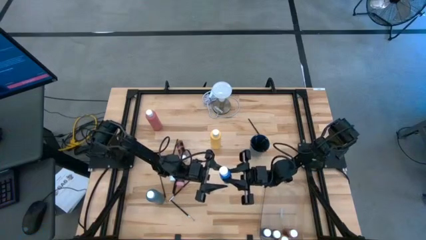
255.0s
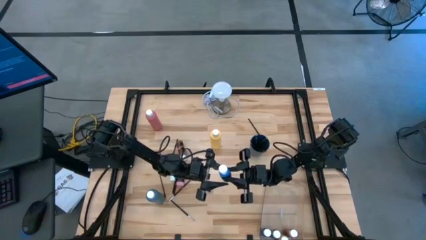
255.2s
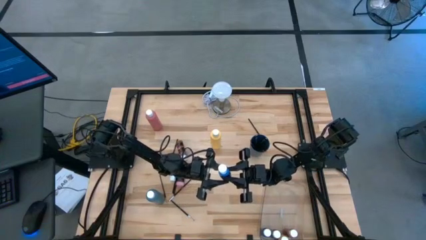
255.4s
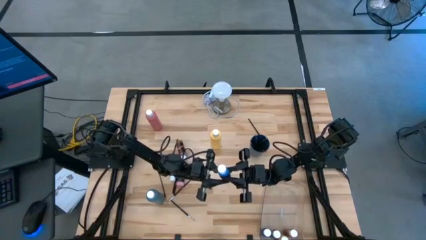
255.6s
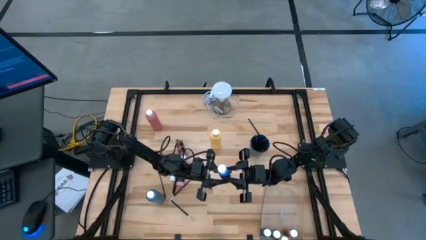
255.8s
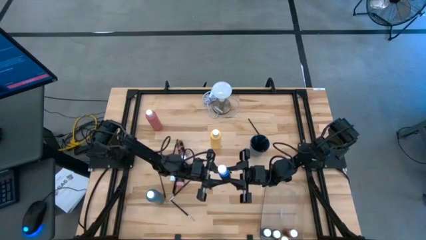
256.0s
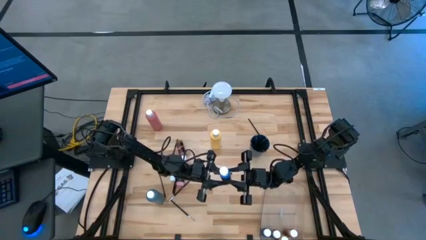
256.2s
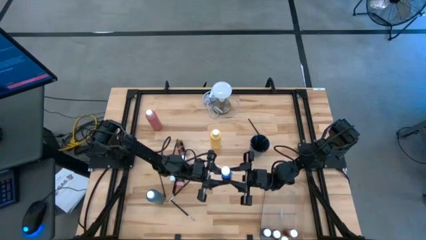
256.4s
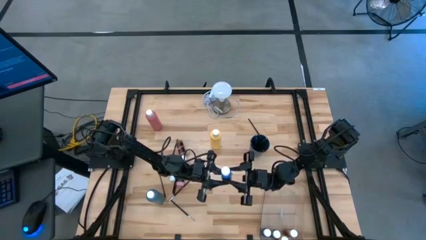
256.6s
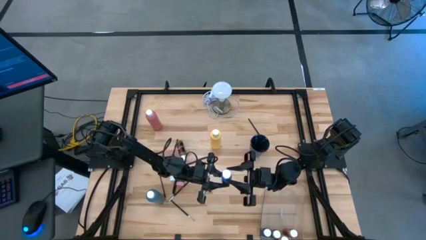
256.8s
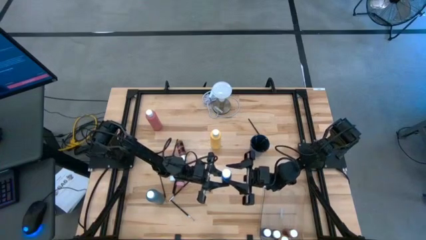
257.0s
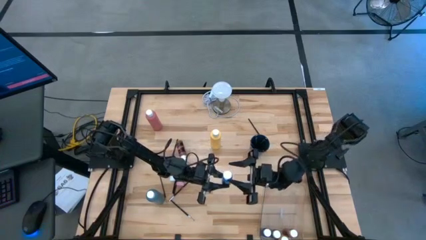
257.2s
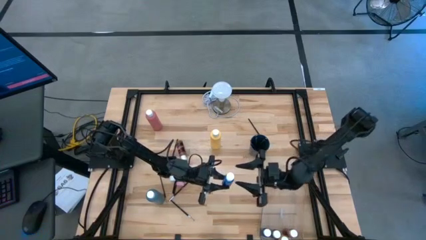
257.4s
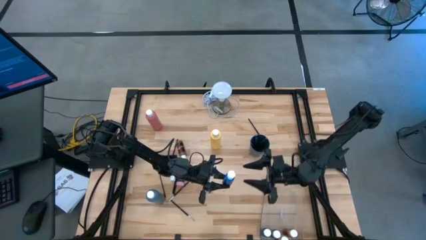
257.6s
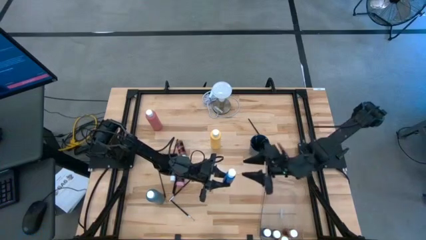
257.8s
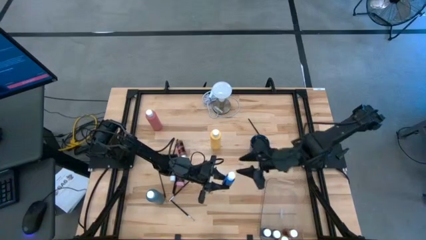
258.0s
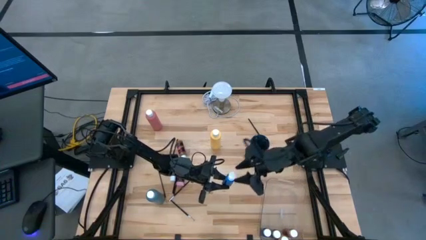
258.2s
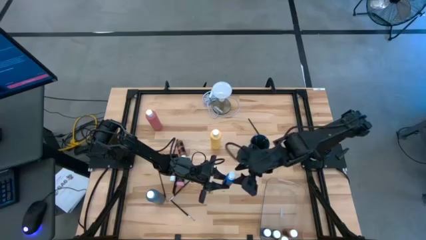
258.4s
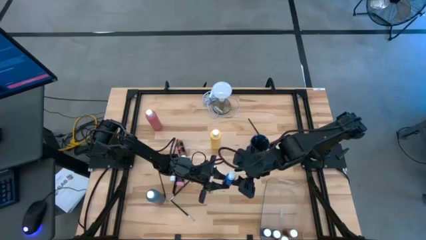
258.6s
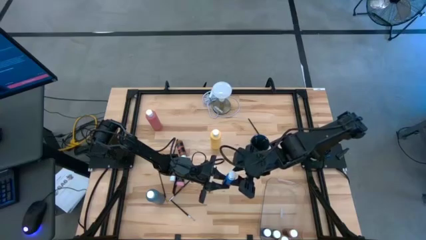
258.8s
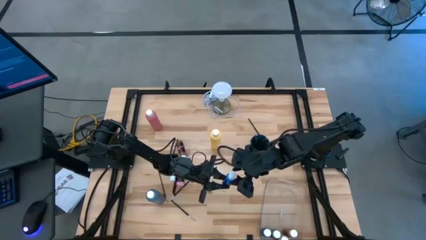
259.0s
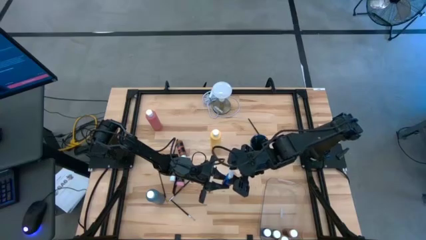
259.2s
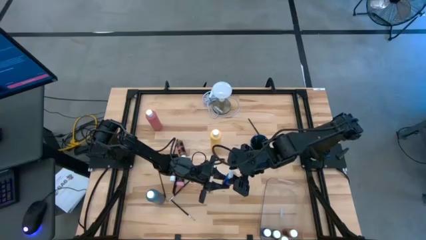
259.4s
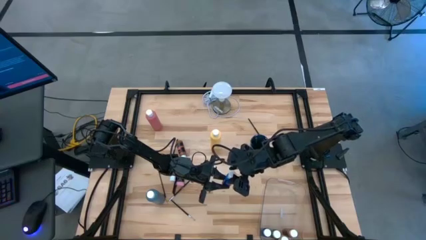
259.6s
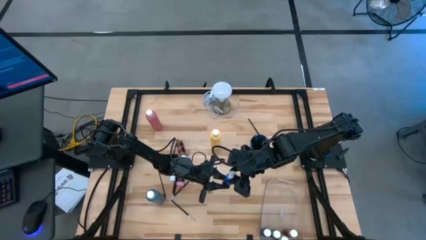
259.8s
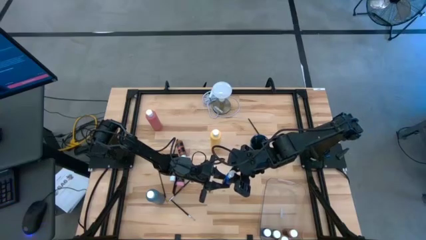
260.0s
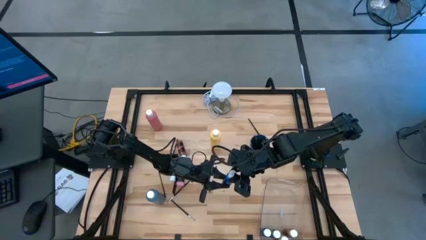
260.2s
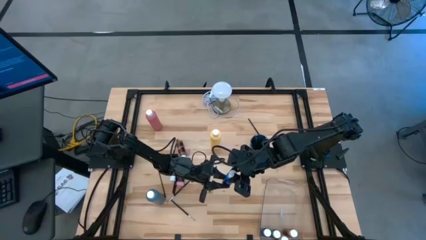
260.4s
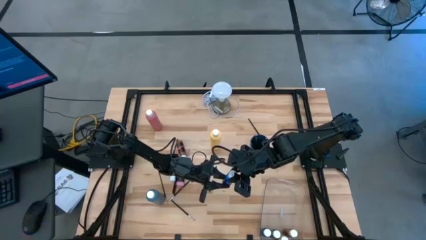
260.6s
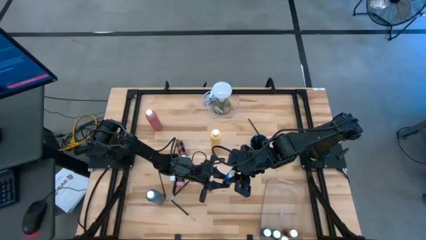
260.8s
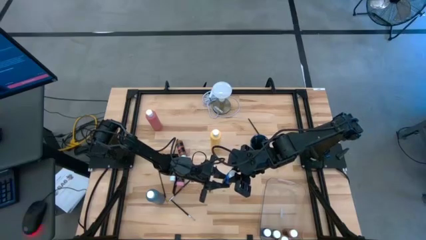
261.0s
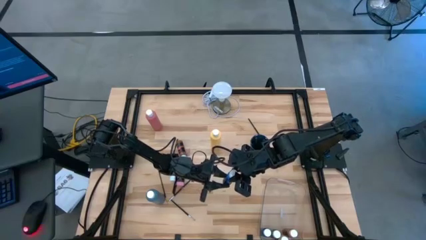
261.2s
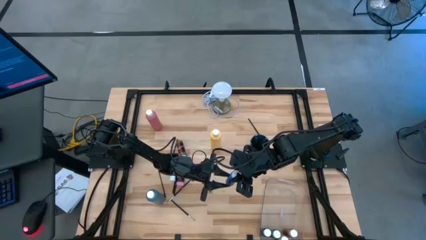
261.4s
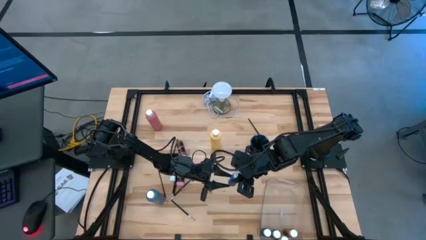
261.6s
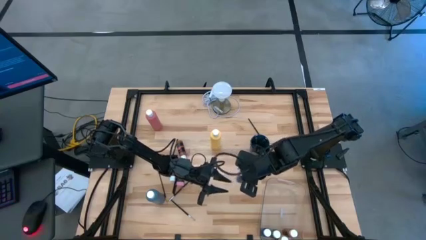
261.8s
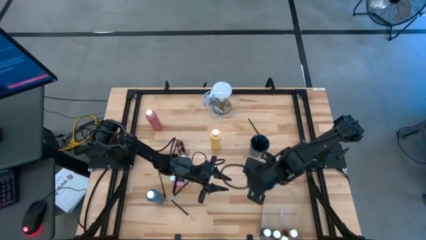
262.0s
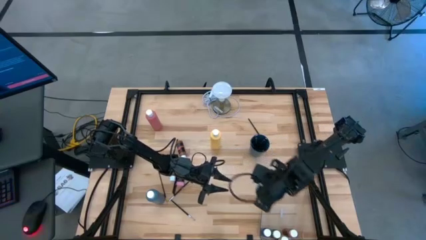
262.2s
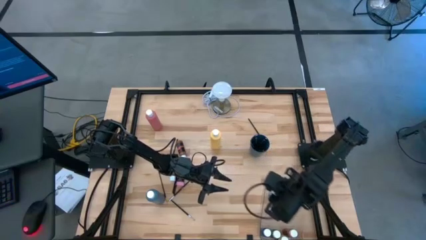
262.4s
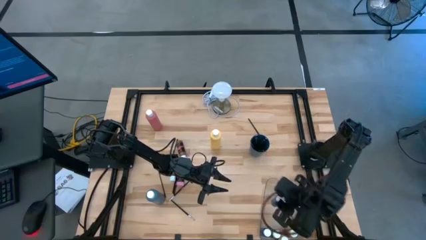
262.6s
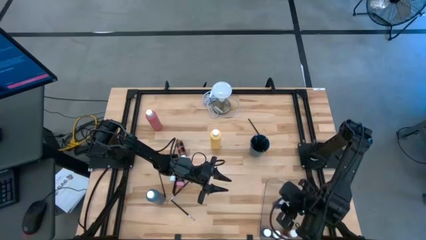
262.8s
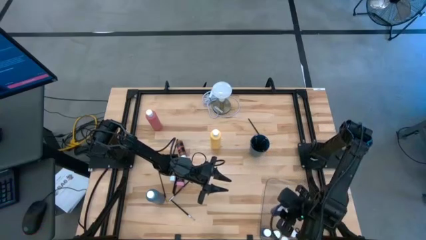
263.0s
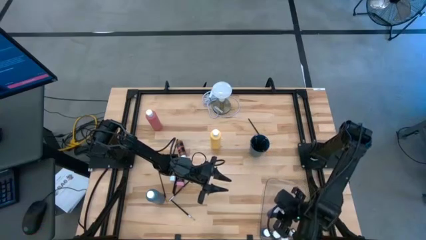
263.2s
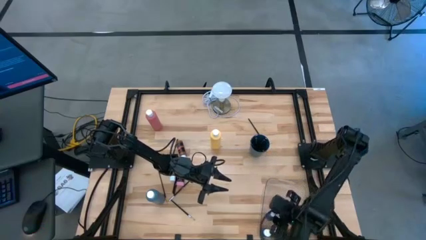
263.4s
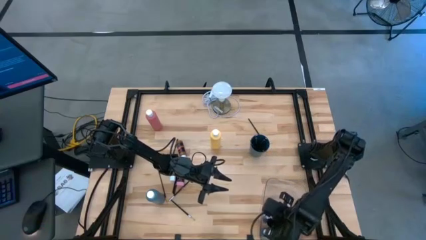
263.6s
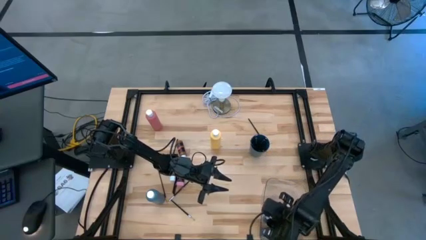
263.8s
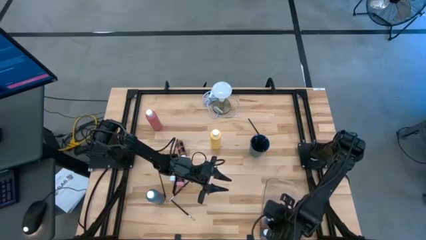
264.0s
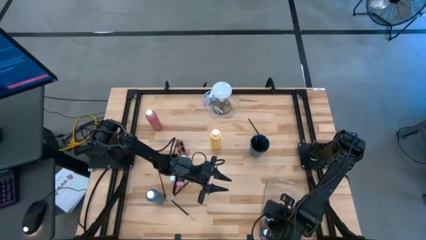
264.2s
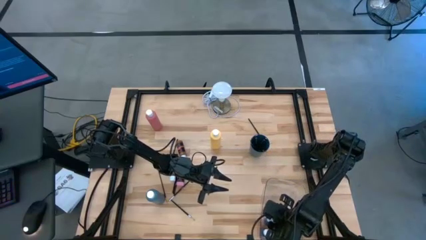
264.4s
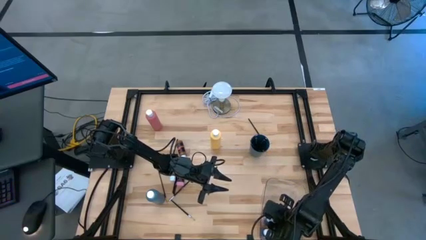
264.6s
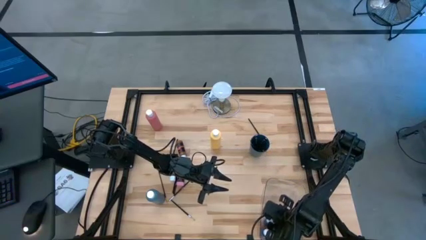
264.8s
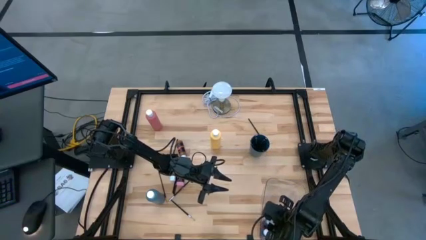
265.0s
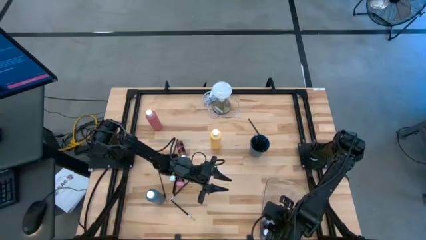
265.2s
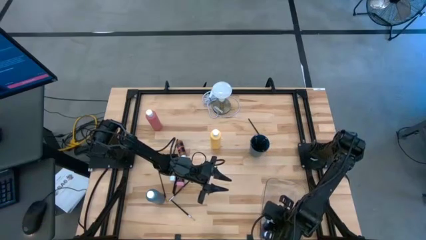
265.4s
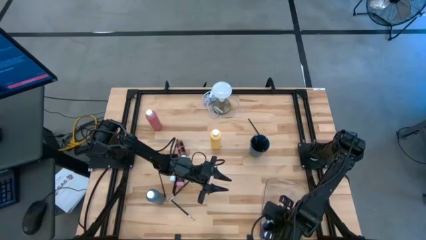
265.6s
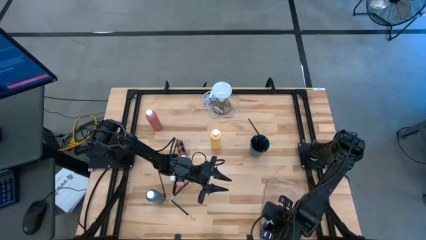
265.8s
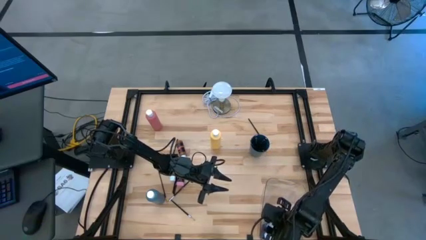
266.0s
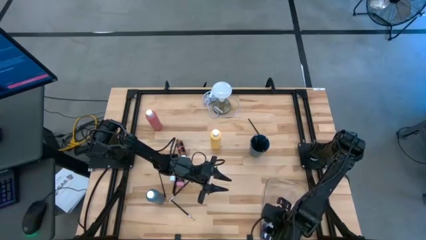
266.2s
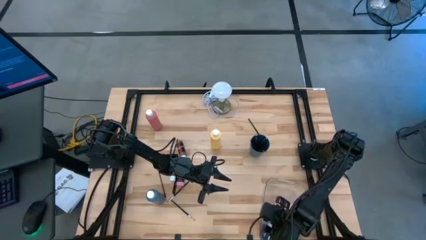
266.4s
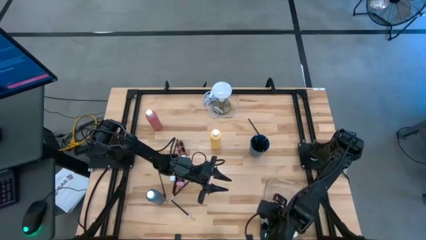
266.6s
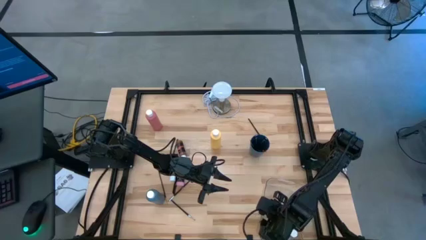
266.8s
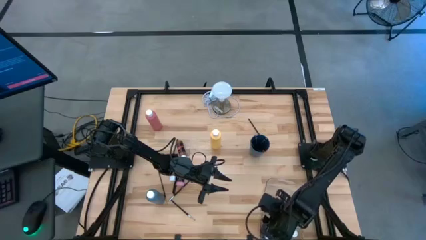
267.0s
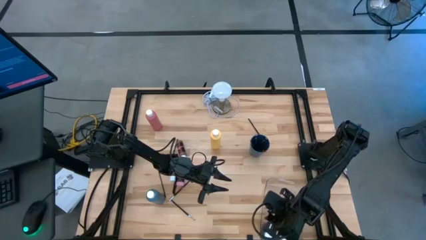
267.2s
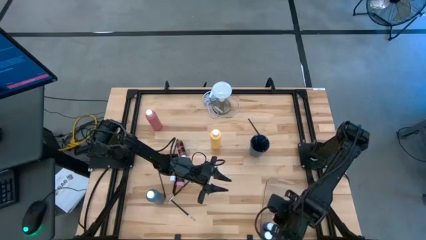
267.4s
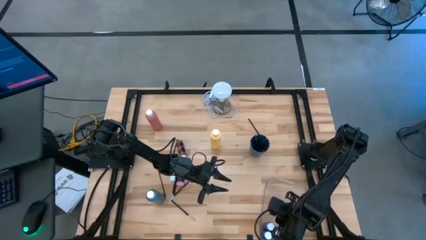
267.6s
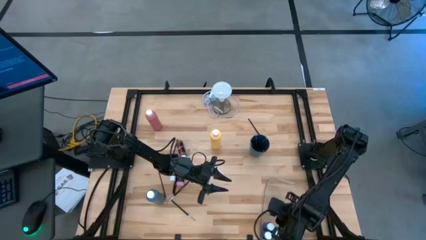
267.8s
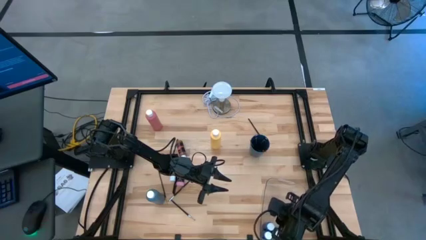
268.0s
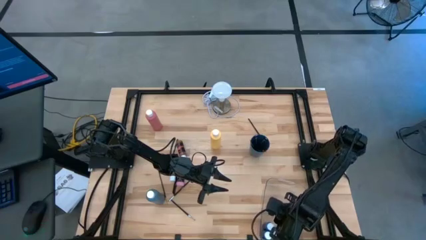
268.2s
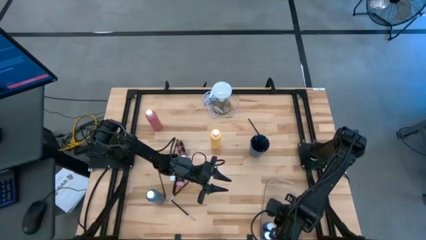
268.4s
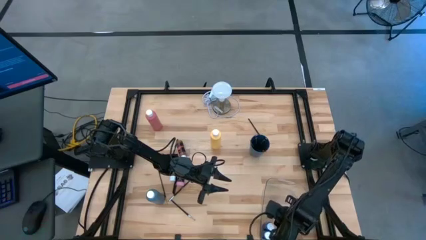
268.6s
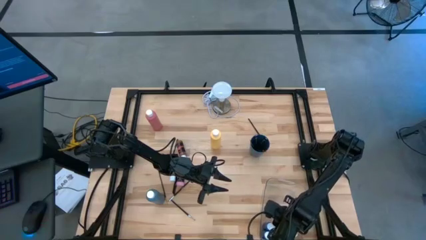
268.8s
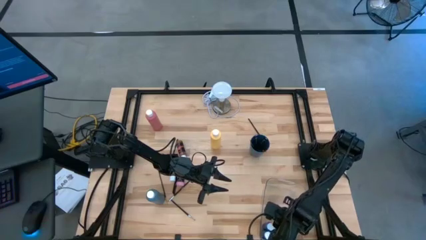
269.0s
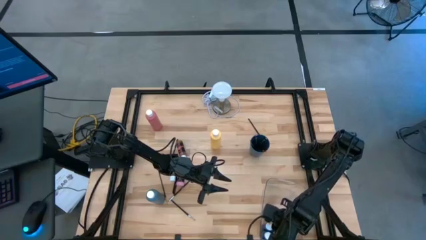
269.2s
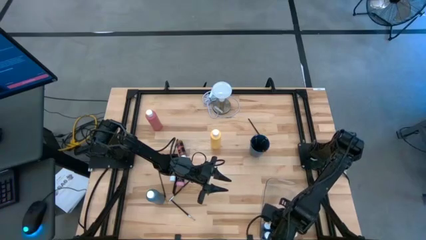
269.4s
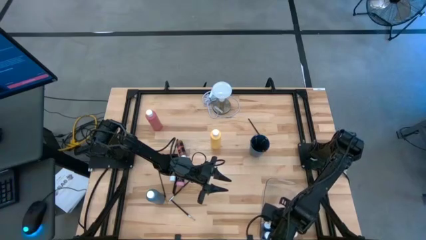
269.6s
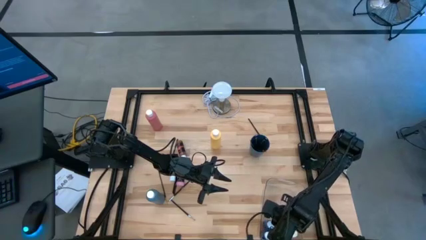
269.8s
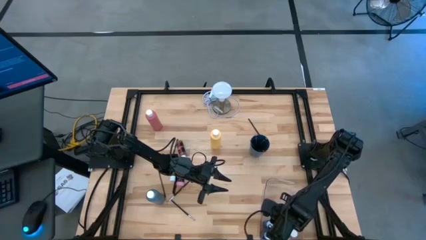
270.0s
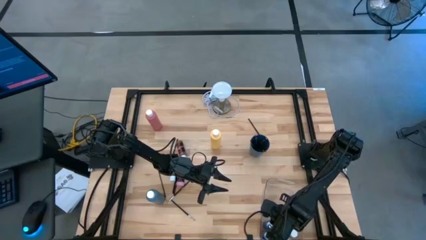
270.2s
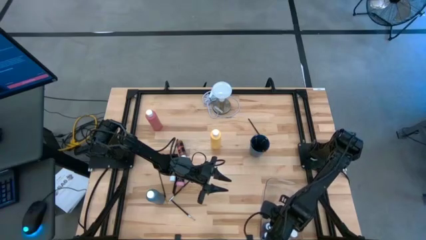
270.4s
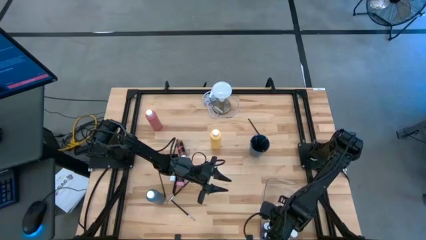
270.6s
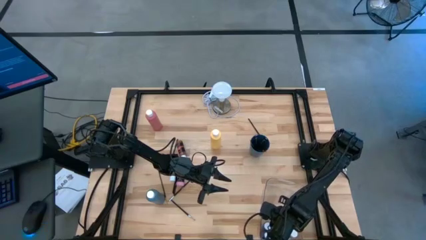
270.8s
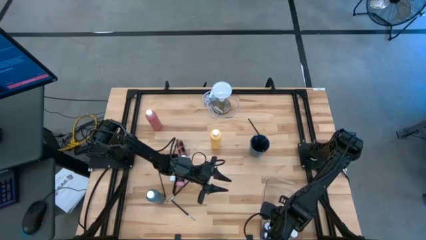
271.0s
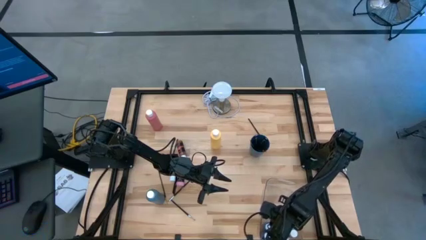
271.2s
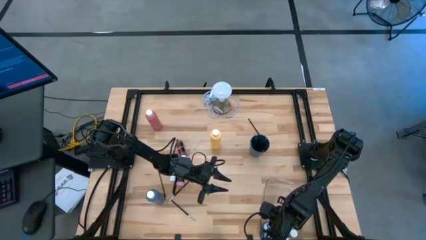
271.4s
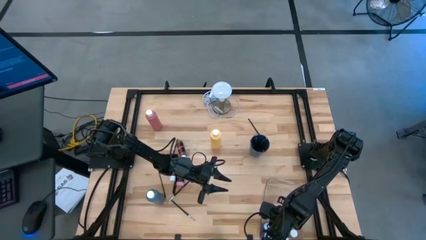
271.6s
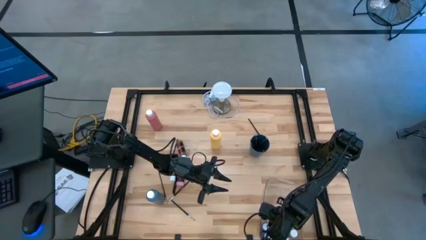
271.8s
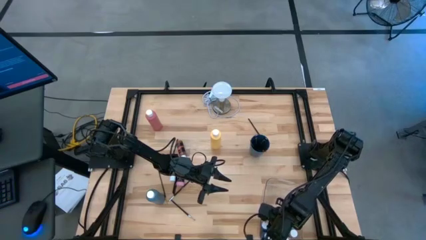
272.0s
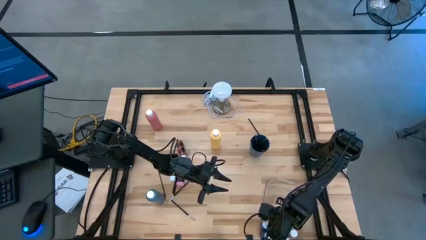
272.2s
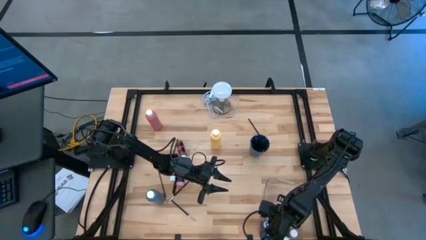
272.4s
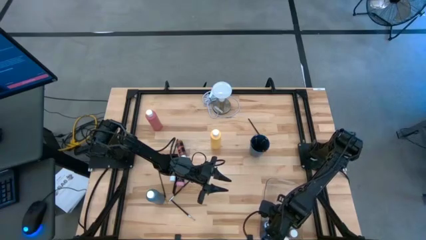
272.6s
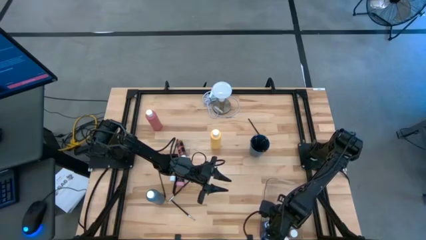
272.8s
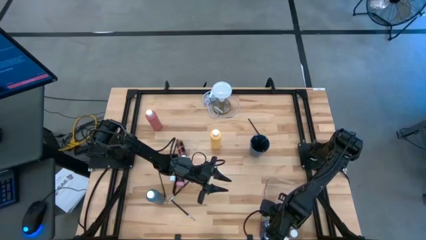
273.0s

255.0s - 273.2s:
Task: Pick & Place Paint Supplies
Put the small blue paint bottle into the transparent bin
